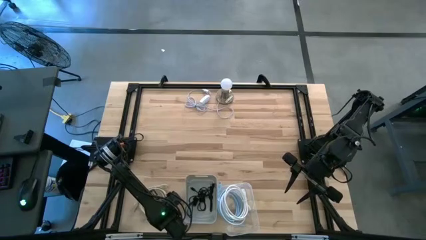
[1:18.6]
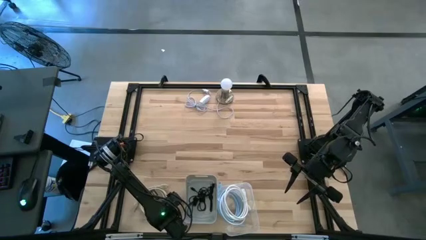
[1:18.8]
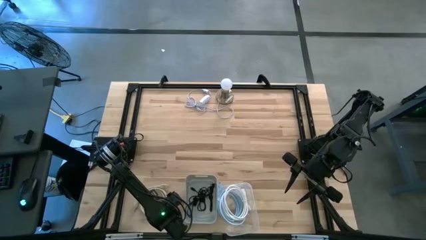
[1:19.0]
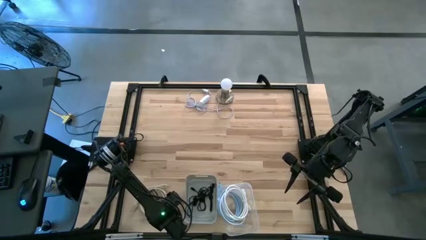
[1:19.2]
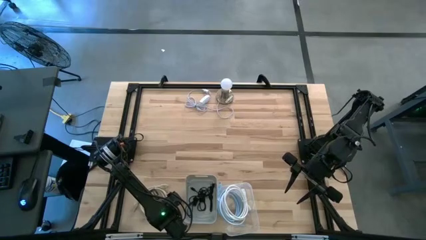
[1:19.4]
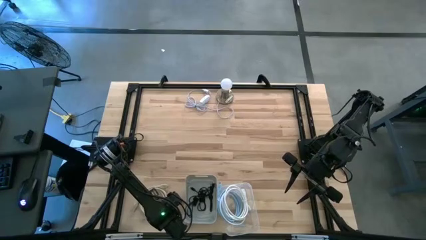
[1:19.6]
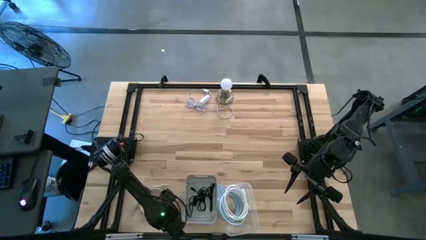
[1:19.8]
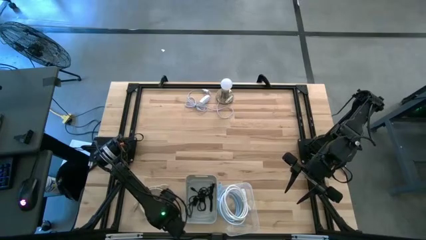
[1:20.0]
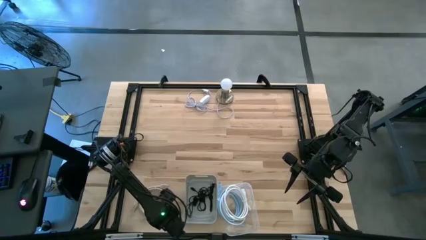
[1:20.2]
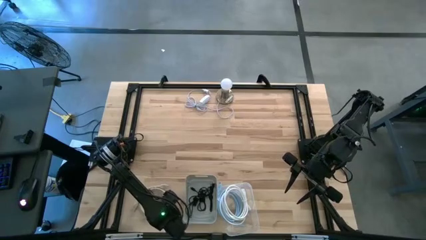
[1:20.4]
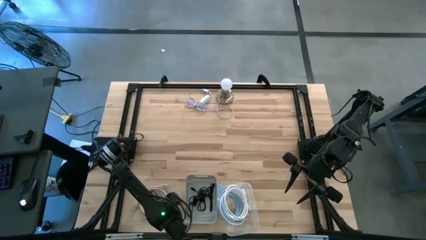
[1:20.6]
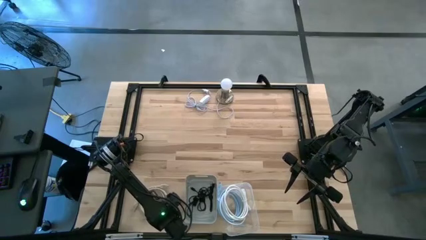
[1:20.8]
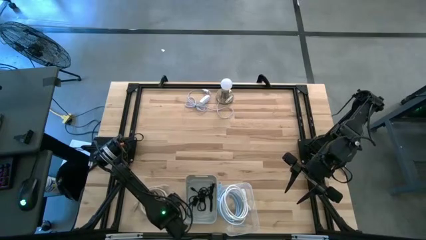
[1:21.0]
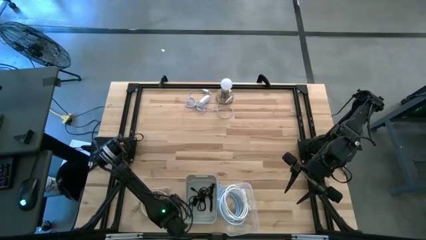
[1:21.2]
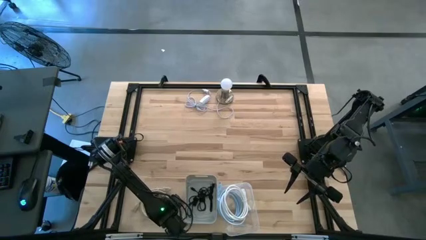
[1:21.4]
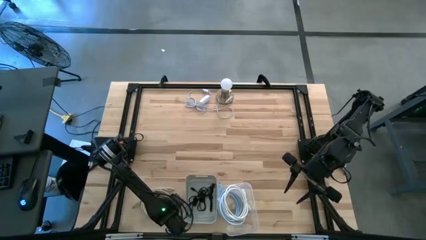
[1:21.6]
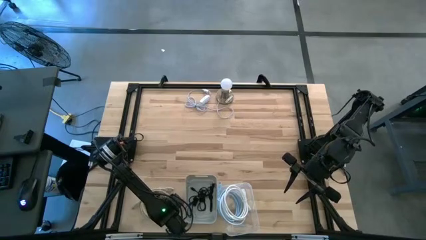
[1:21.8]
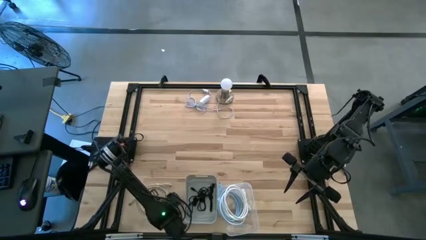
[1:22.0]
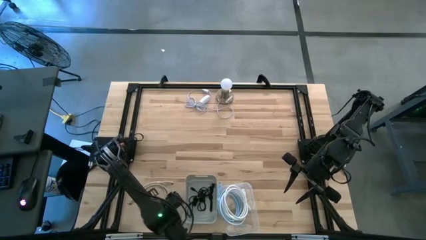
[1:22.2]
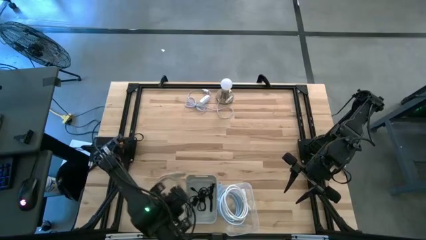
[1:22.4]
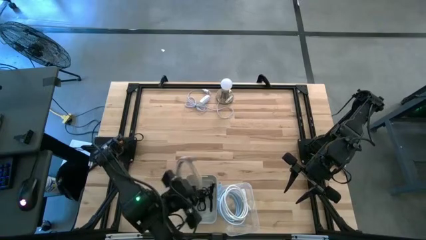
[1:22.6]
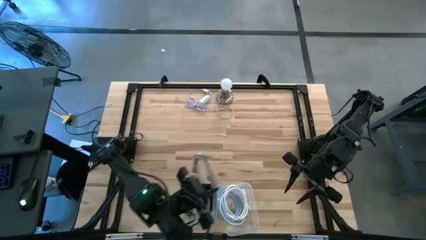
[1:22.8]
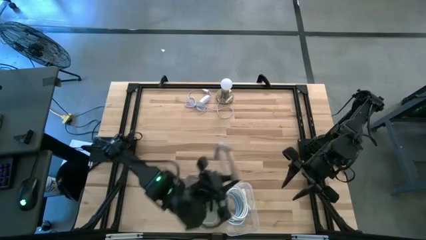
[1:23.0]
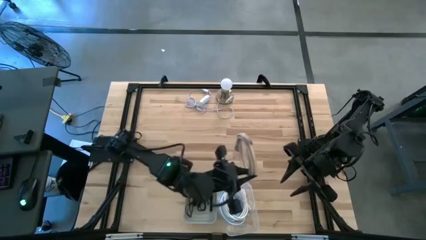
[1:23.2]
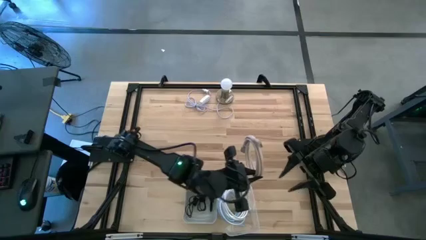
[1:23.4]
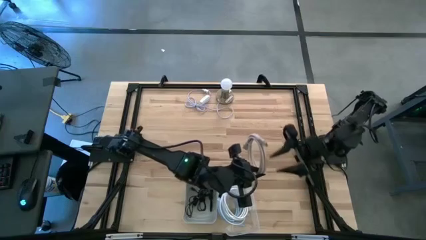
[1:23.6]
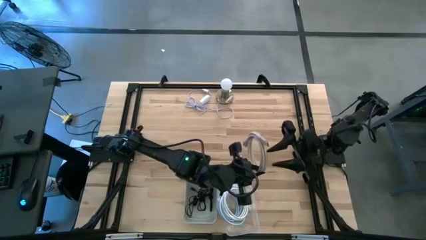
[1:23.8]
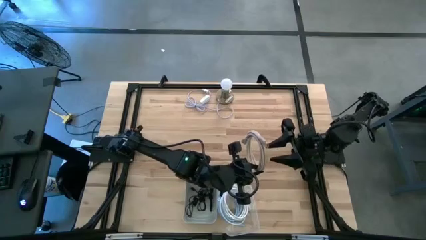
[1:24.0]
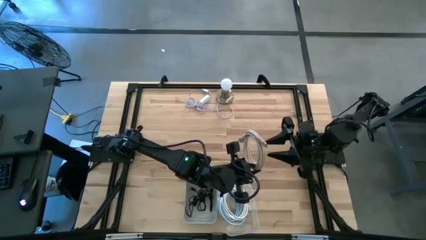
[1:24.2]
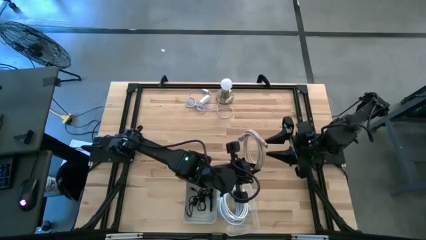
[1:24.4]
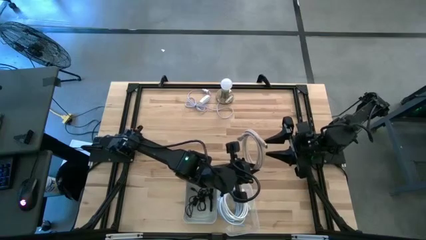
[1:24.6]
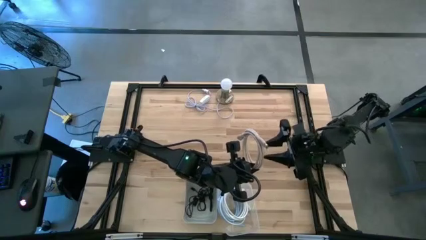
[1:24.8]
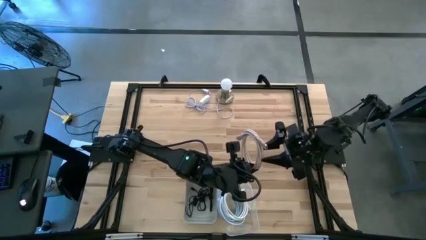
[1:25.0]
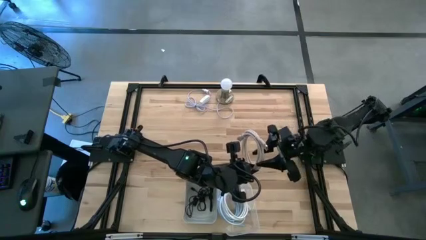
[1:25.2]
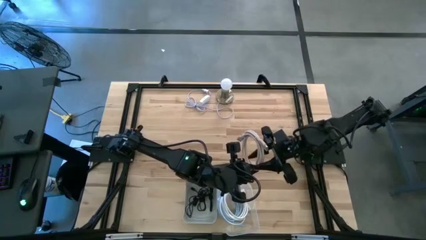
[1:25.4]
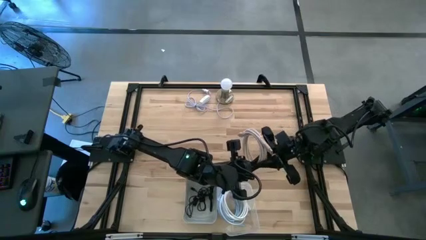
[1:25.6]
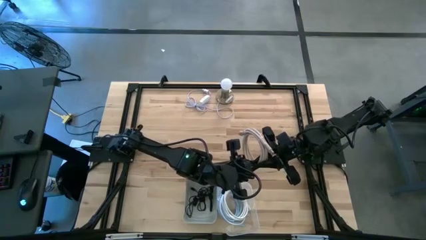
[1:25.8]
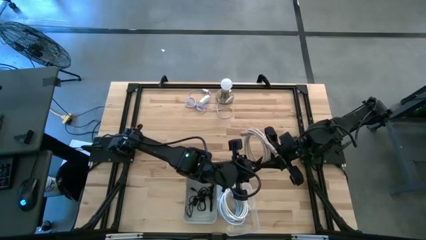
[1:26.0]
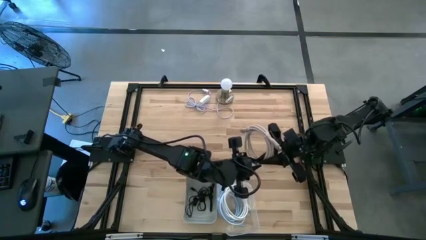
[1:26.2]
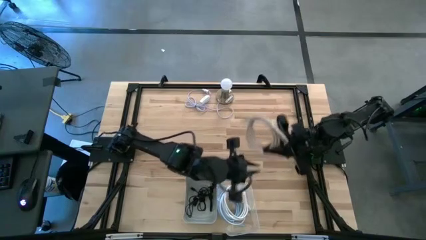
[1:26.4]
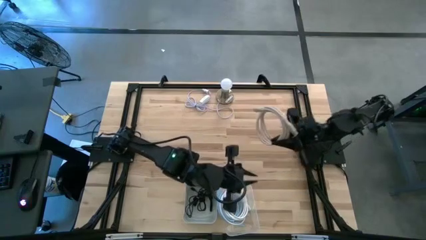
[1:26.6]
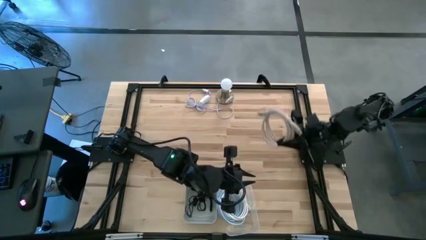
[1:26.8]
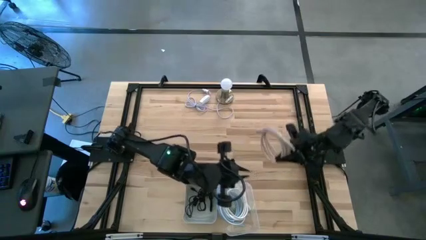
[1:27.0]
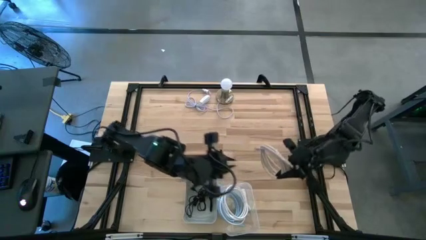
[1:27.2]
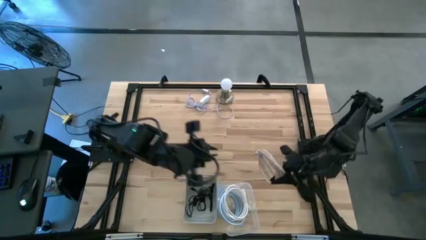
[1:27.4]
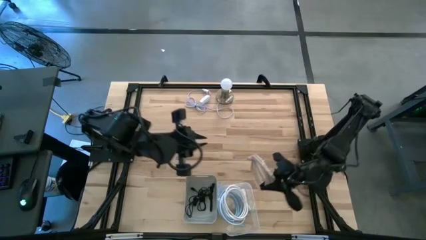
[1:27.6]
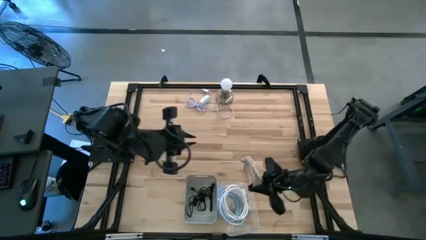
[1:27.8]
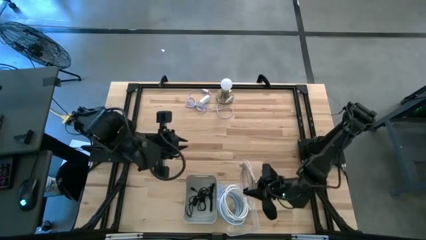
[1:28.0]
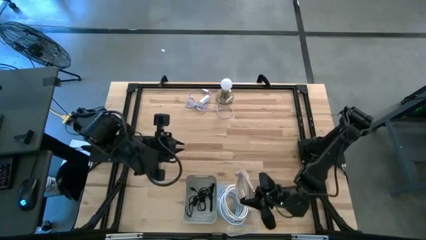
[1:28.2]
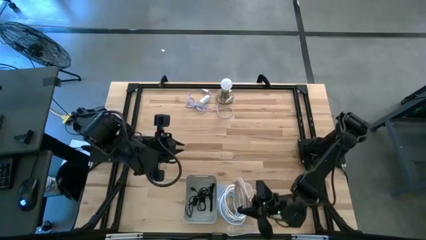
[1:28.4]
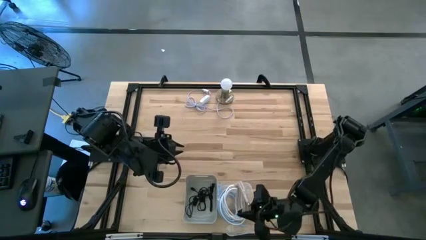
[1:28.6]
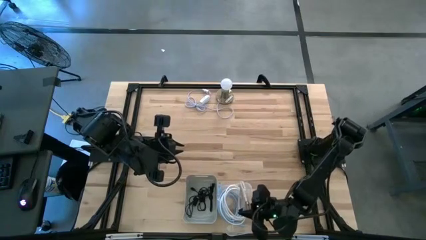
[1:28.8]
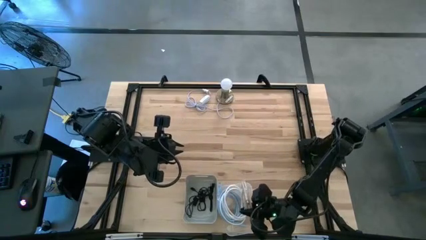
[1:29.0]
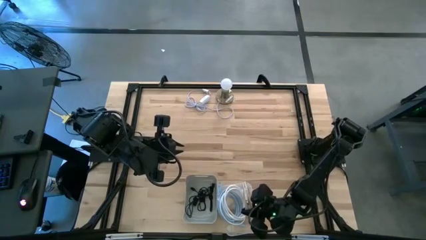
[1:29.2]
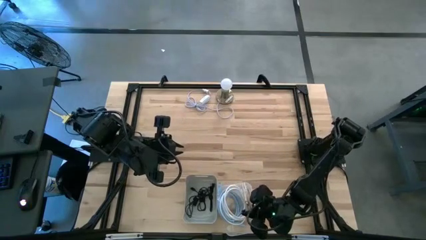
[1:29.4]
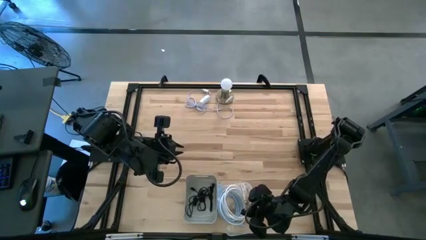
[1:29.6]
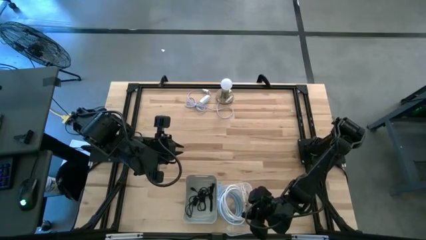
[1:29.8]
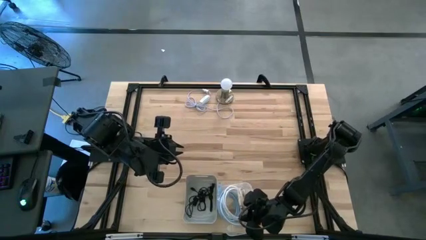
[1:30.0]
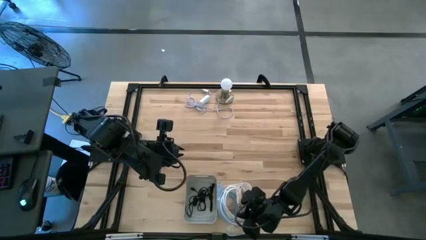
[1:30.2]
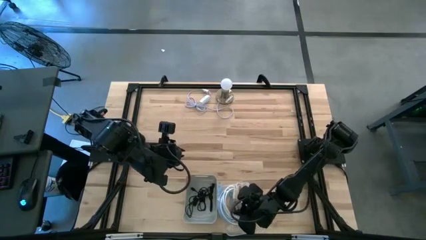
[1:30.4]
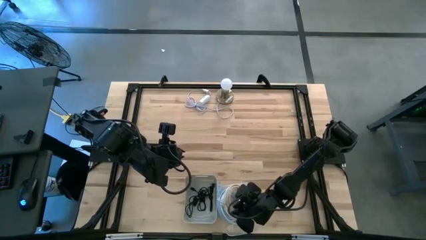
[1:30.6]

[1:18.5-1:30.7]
Task: Pick & Place USB Port
Put the brown HDMI cable into the transparent bin

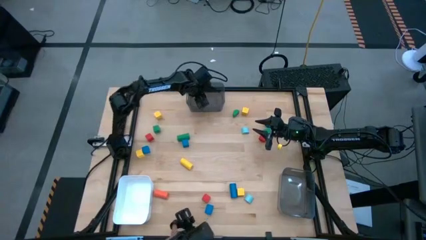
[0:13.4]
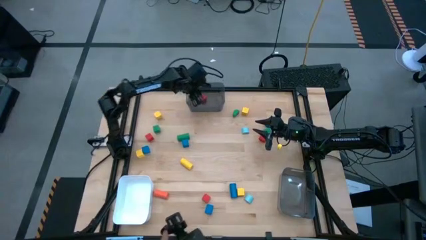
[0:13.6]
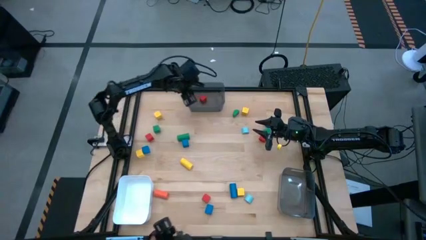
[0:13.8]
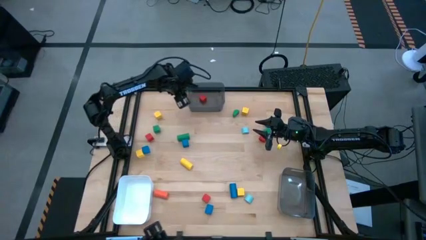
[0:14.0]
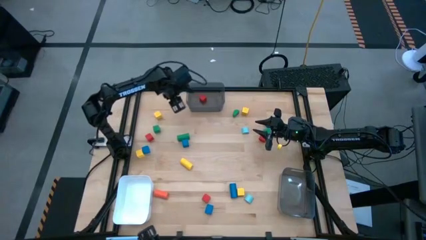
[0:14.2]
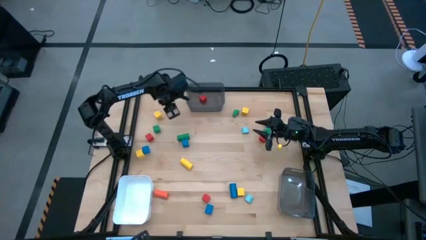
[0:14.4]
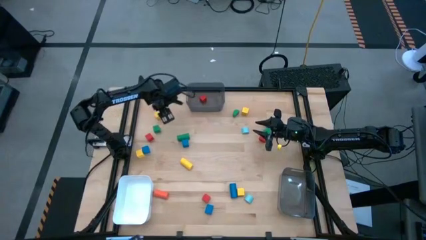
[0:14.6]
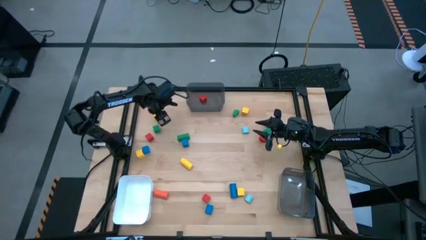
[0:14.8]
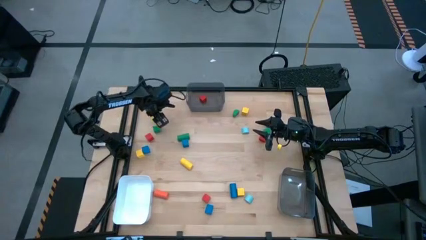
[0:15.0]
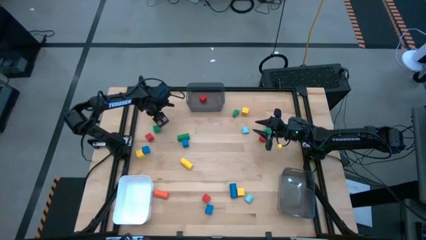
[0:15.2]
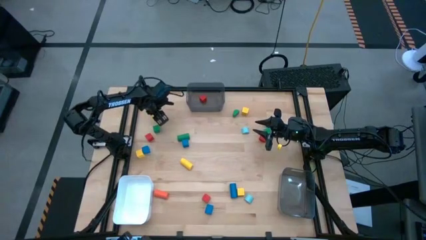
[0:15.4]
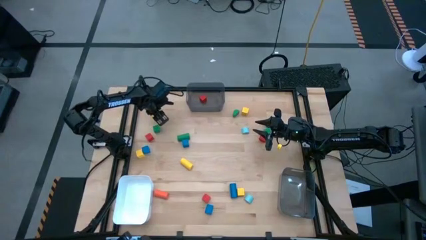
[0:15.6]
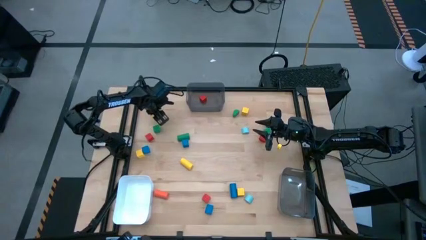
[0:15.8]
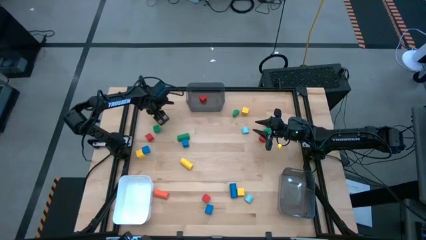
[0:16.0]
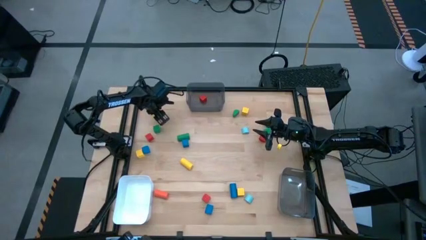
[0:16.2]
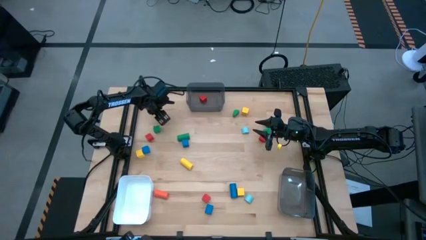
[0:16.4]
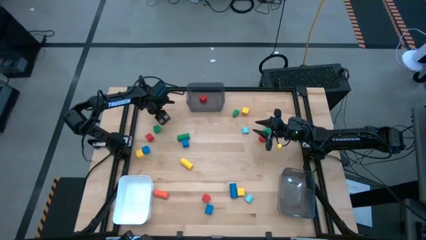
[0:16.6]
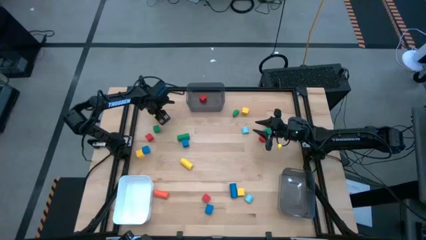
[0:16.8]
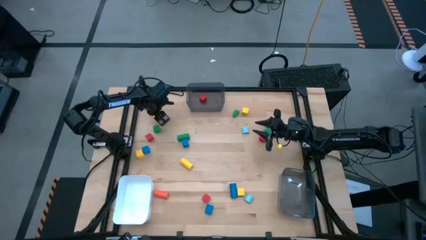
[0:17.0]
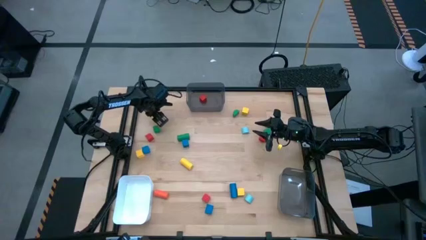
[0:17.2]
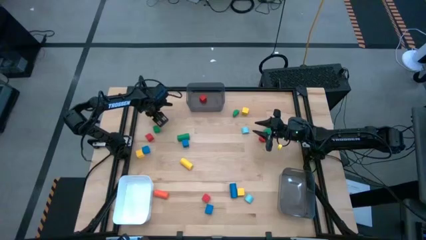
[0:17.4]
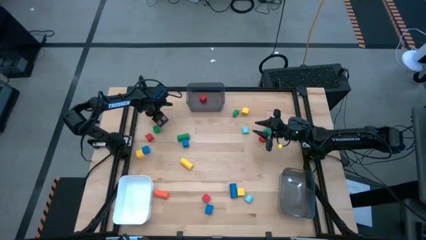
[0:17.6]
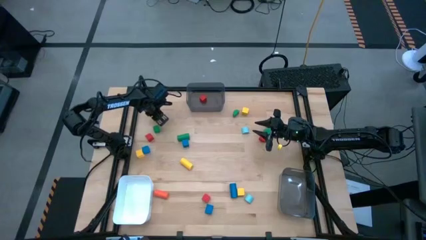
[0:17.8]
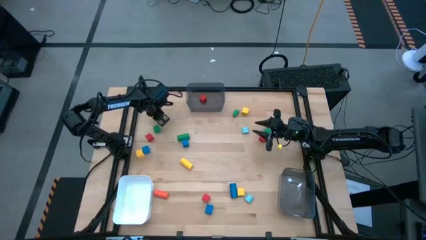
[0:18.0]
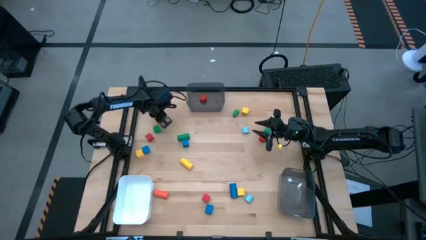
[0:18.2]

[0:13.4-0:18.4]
Task: Sort blocks by size
Put the yellow square block into the top black bin
